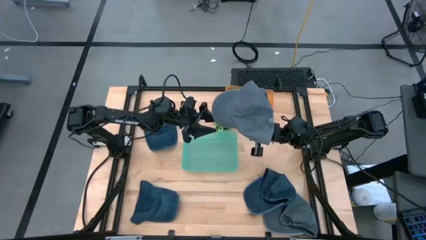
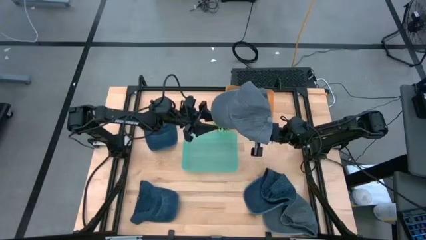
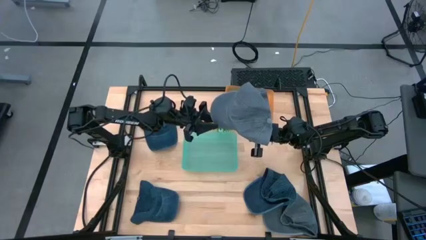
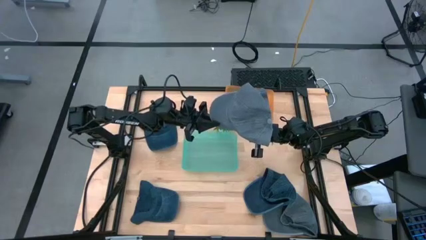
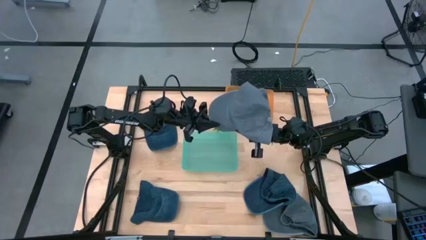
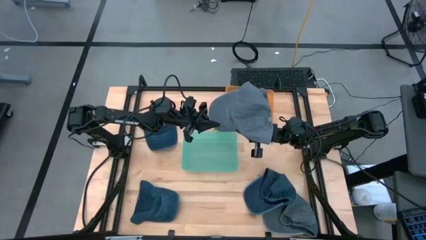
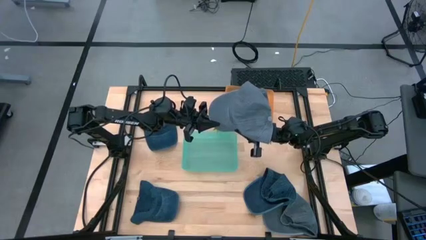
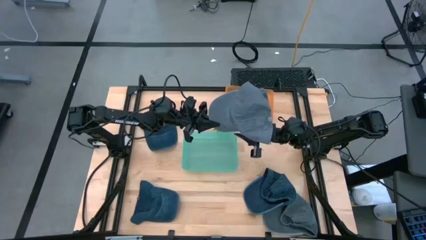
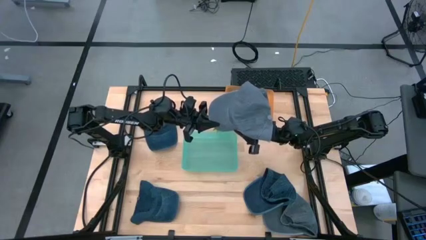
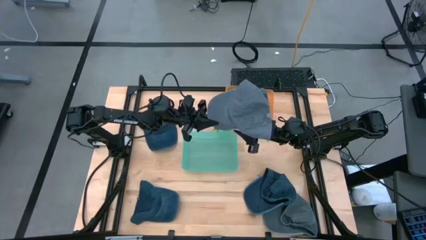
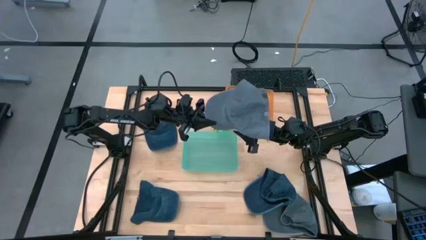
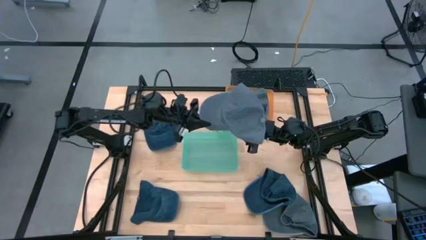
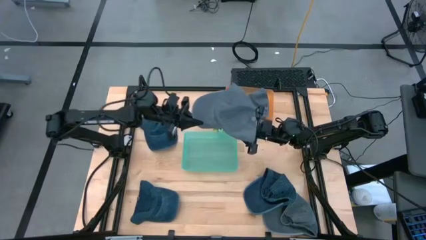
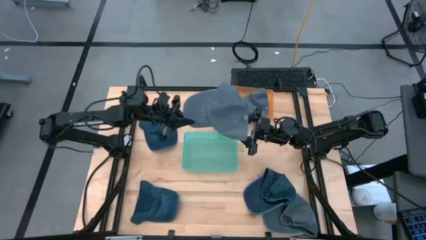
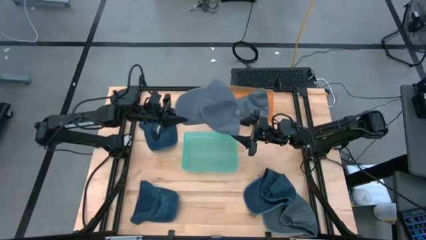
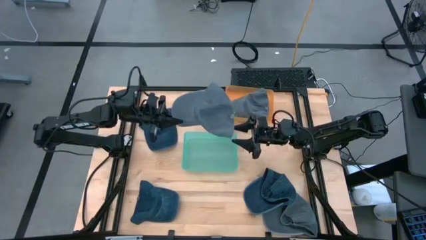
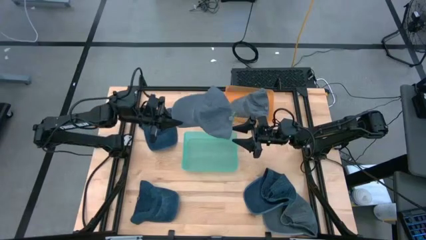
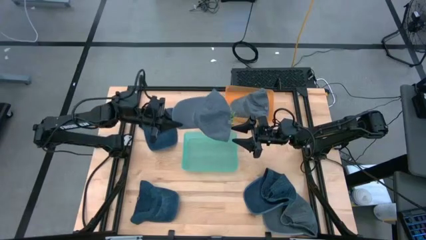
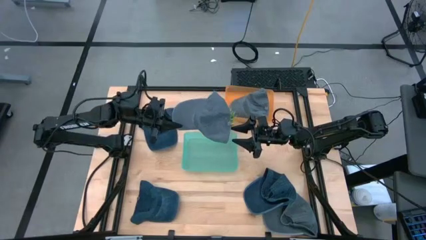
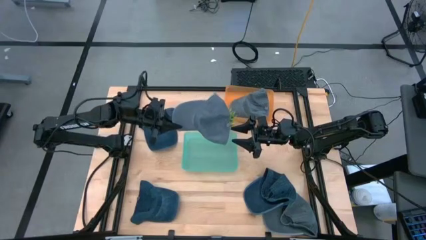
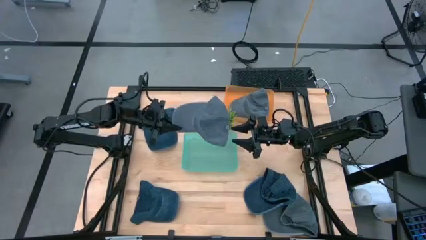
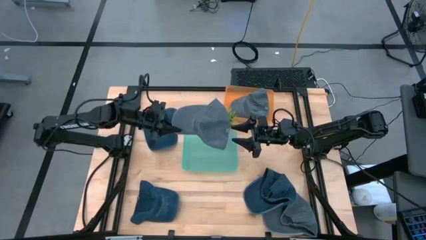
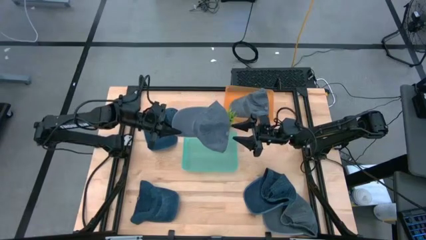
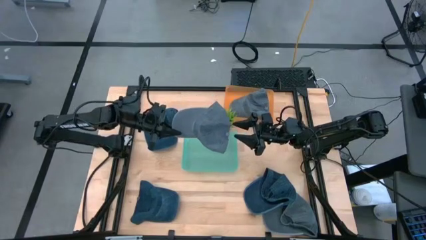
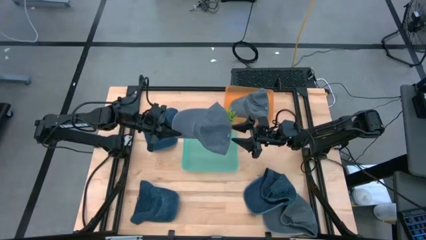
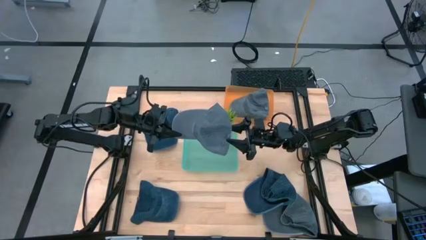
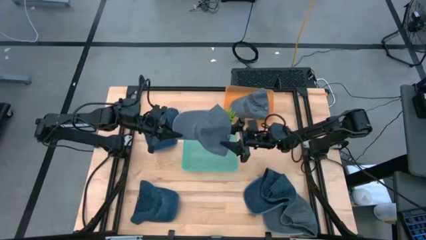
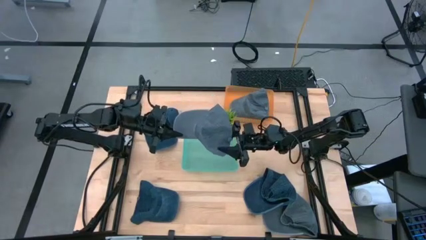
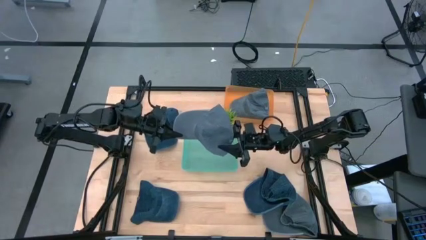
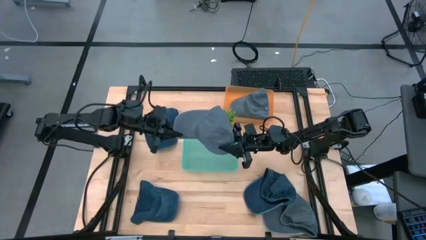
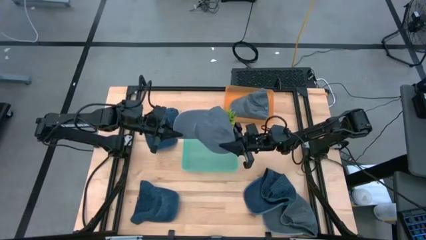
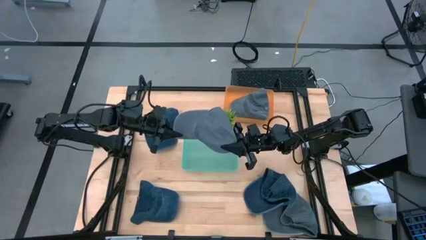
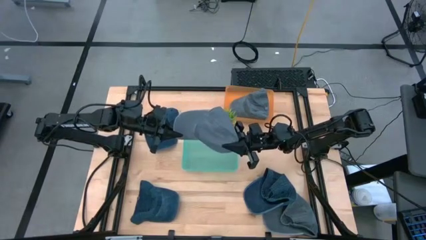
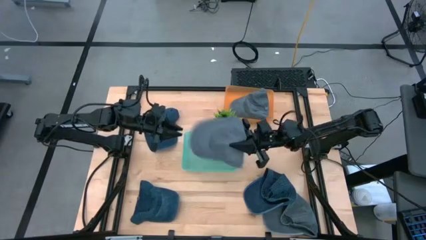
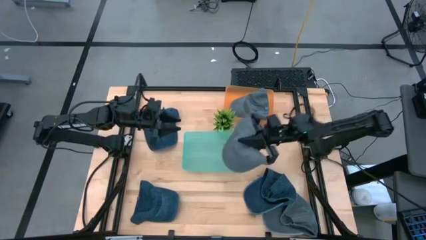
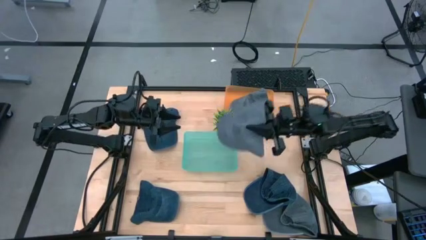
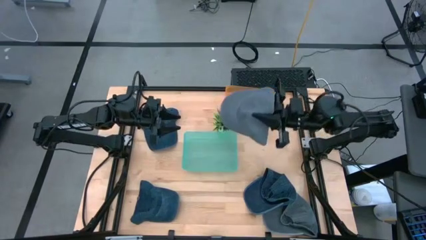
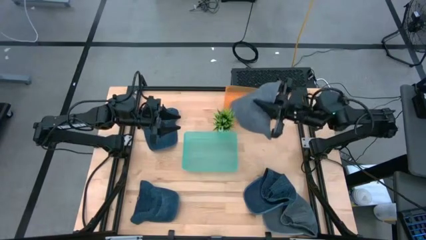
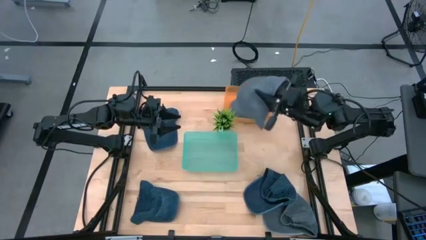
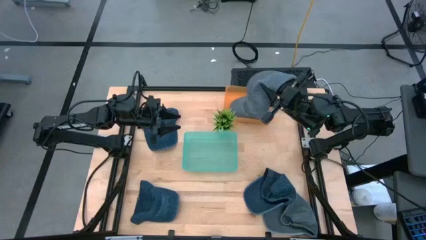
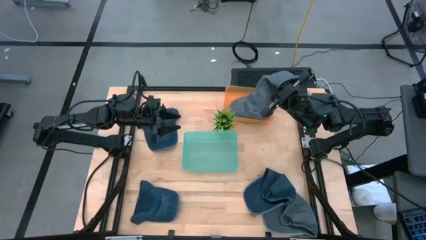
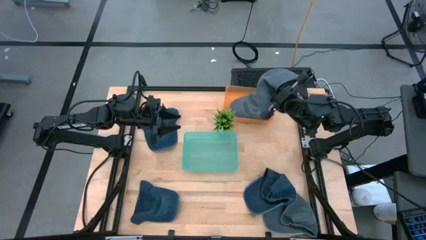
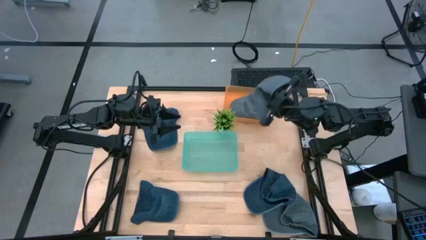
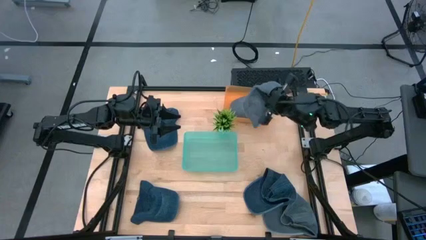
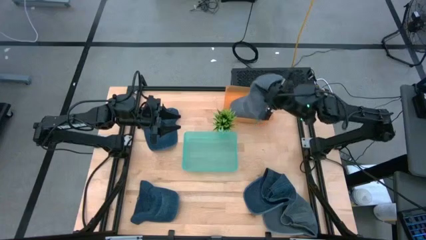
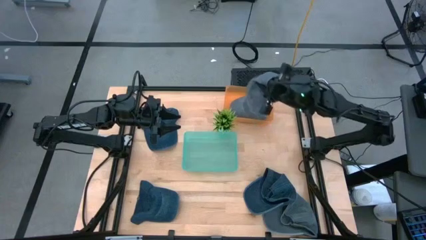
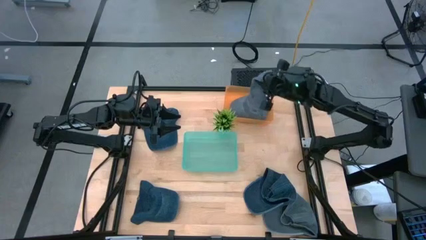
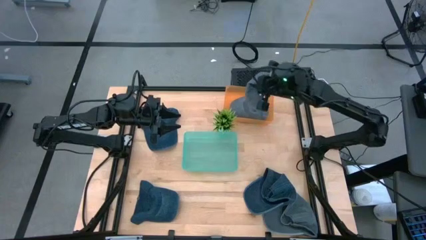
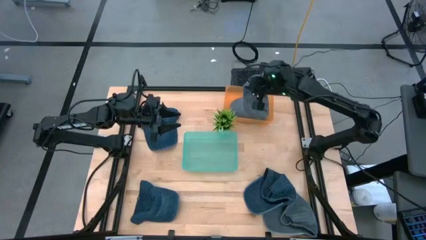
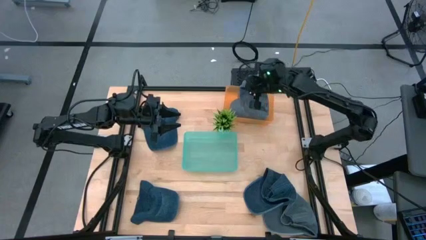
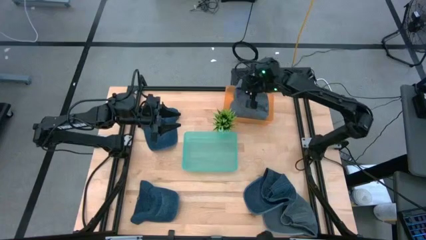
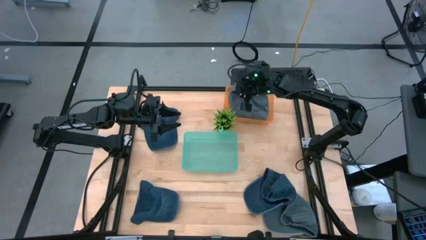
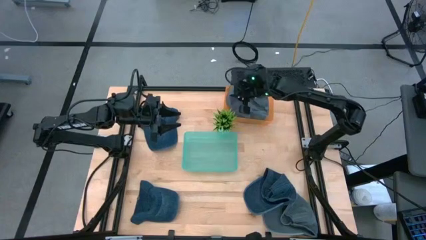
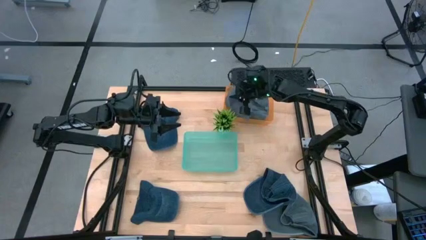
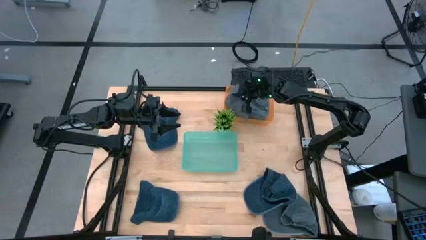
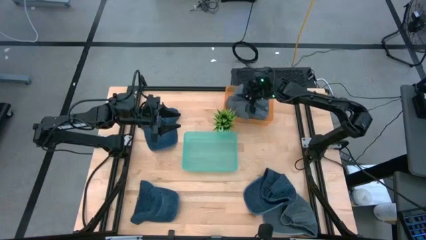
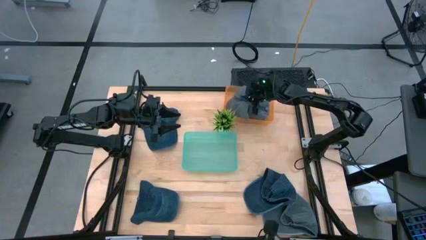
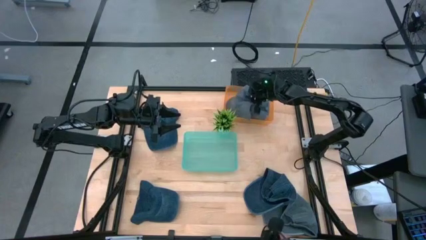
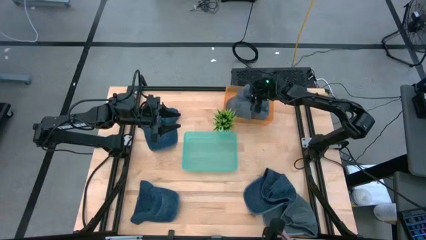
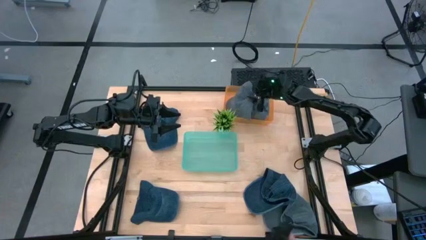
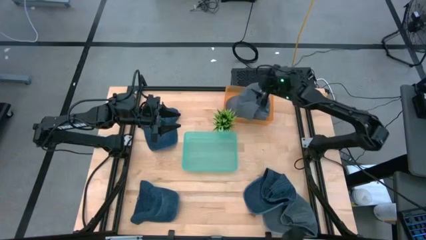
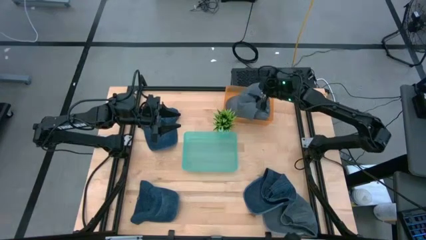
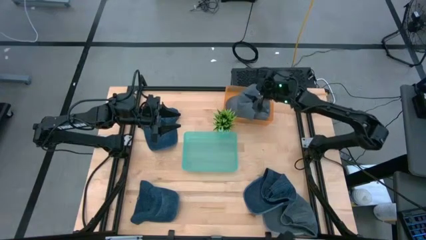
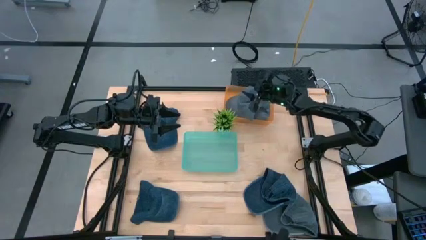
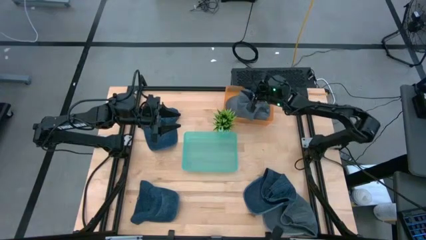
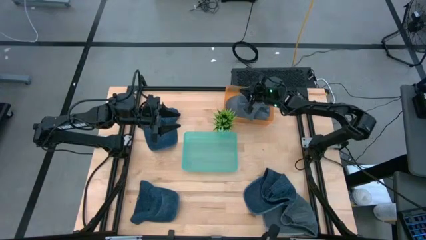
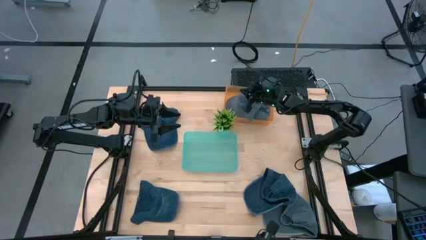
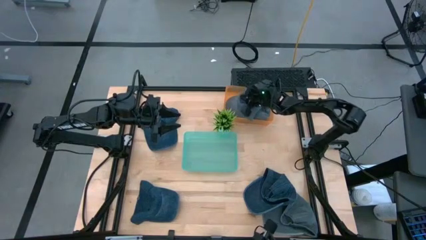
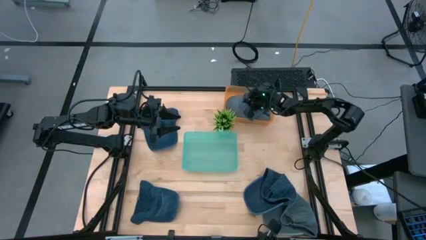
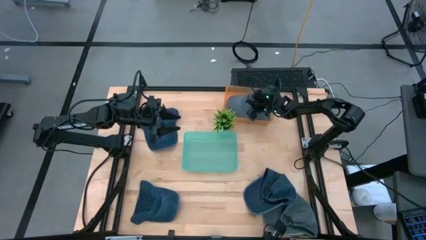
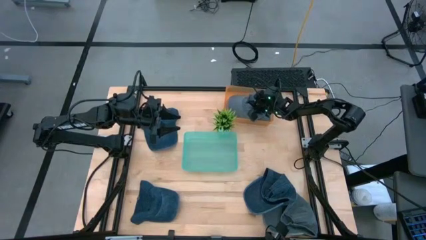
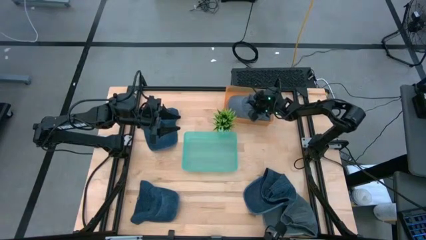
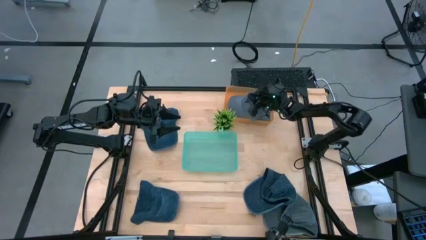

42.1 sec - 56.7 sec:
Task: Pick & Place hat
Put the top gray cap into the orange bin

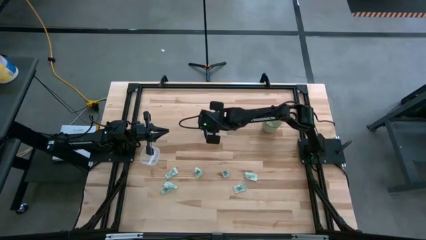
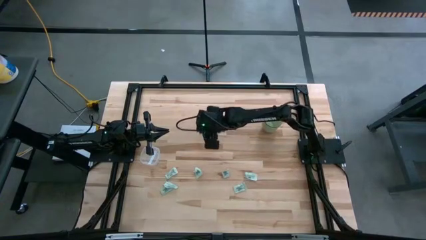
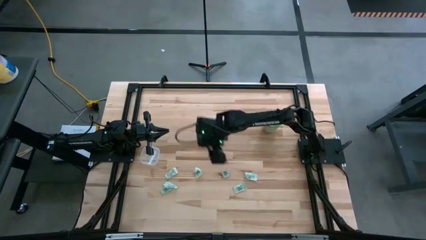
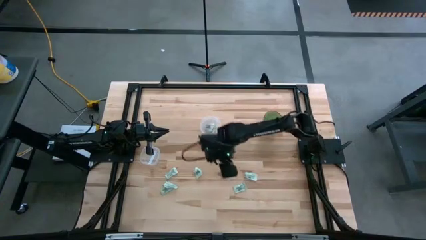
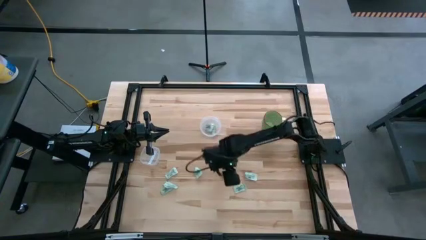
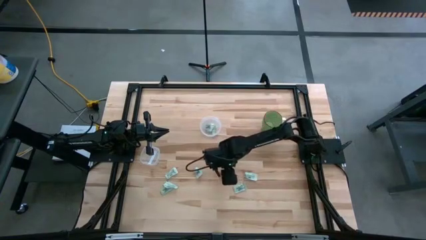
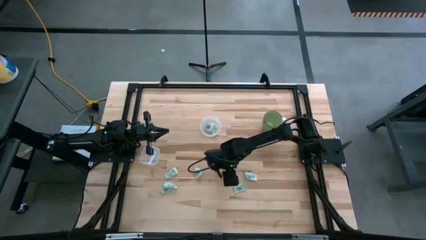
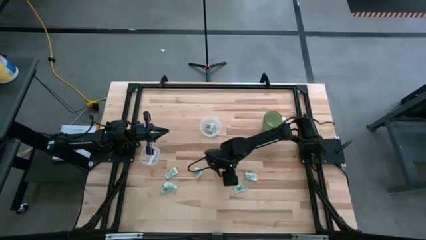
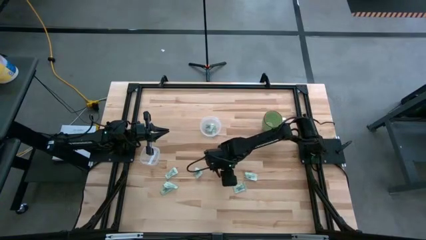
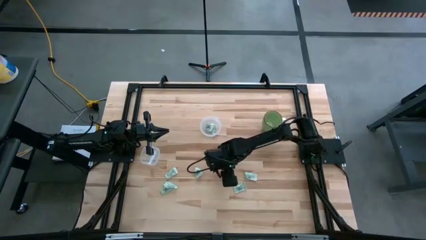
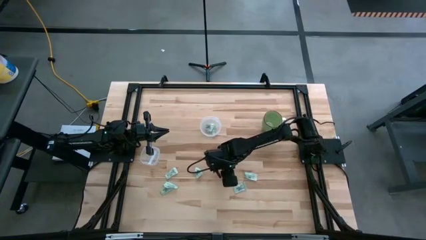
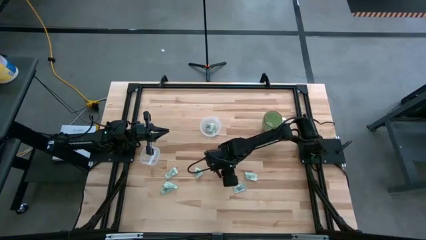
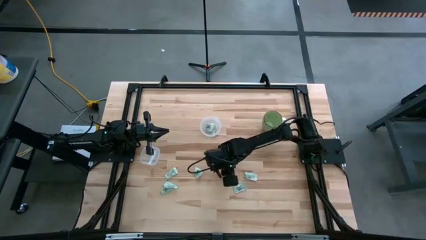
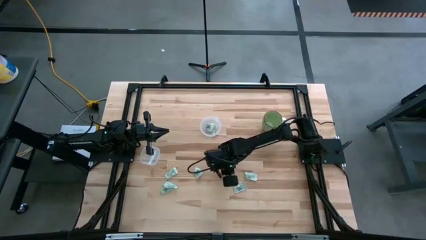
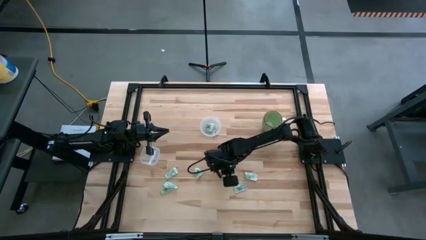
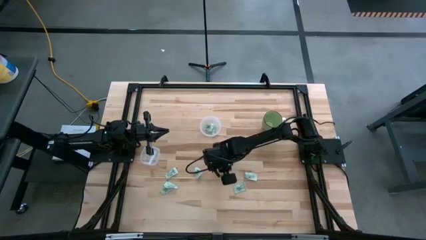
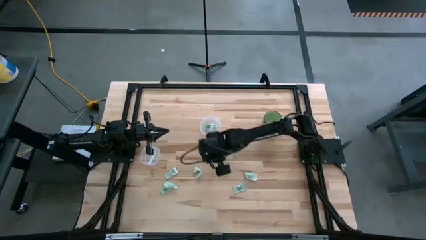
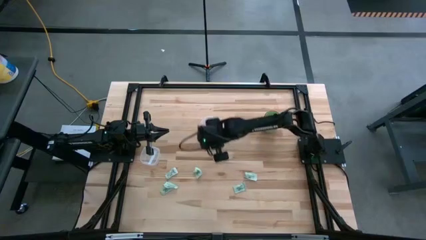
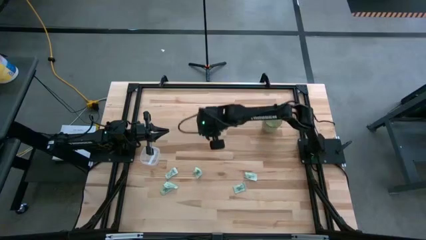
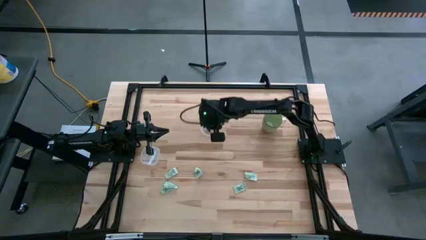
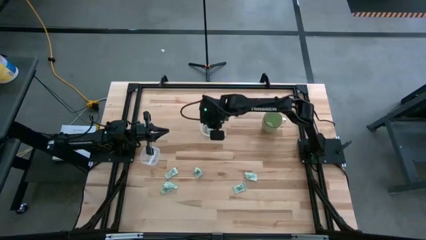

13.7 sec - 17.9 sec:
Task: Pick and place Stevia / Truvia into bins
Put the stevia packet into the right transparent container
